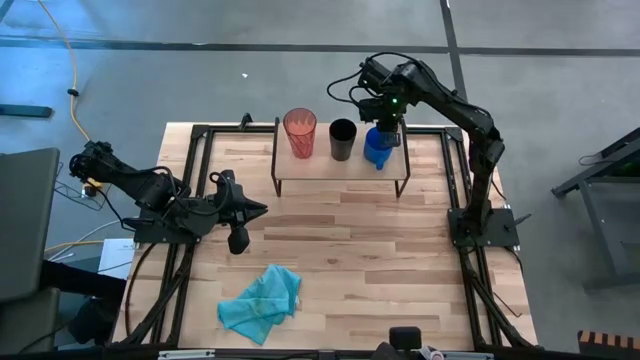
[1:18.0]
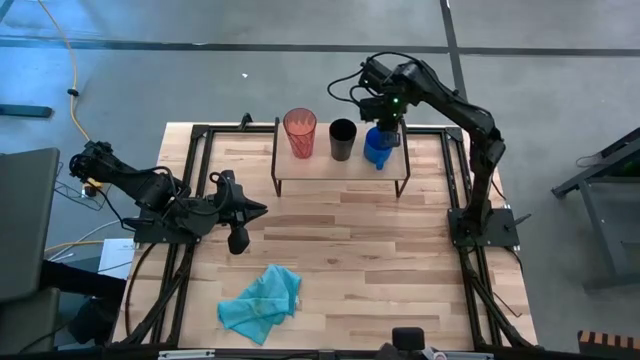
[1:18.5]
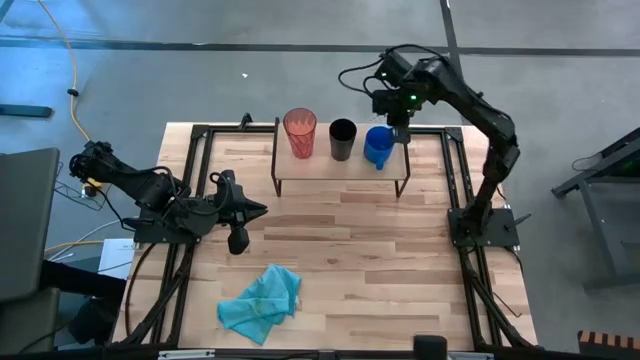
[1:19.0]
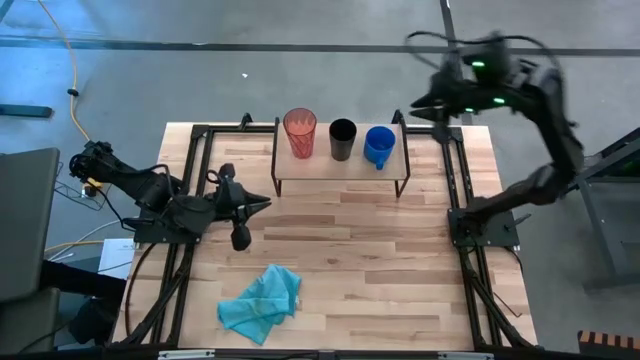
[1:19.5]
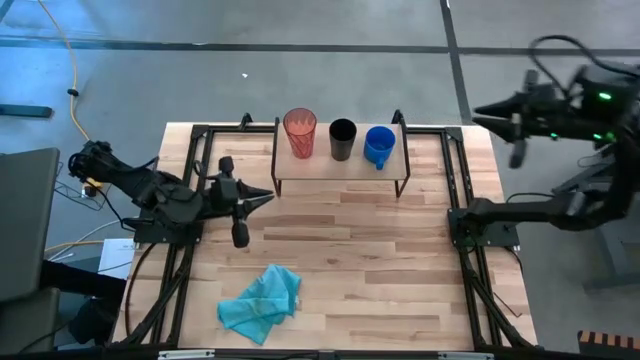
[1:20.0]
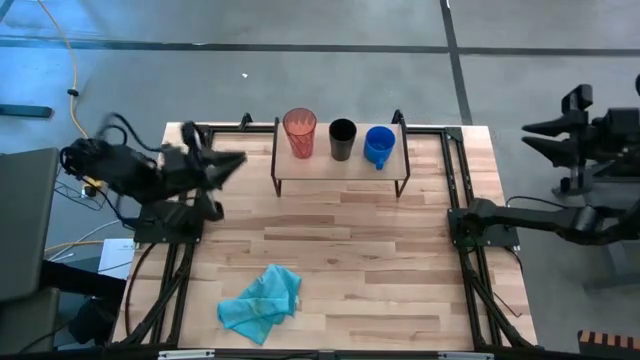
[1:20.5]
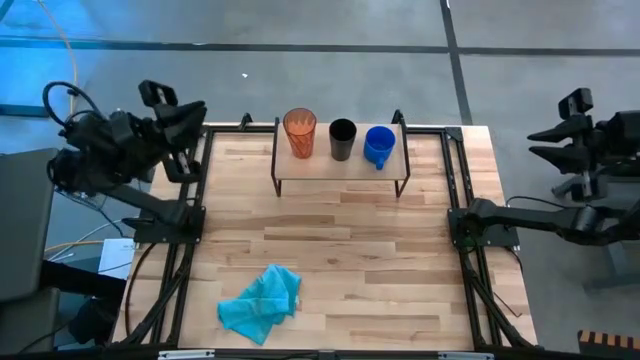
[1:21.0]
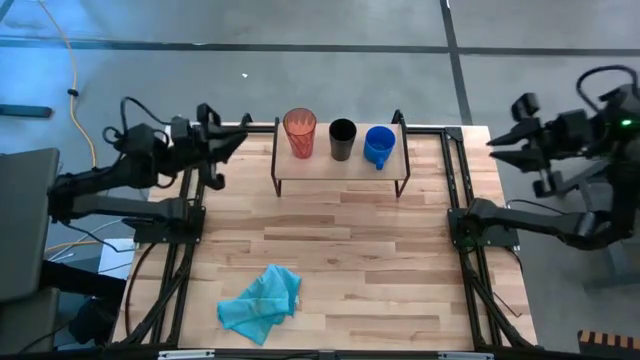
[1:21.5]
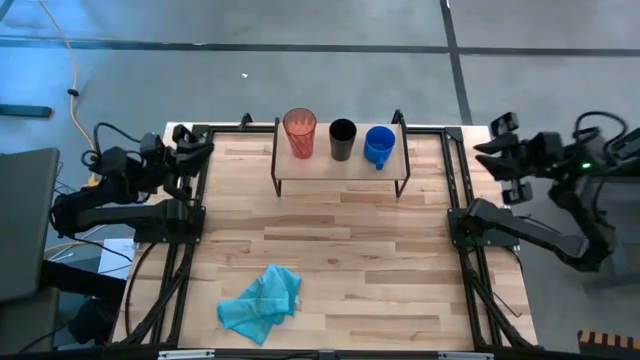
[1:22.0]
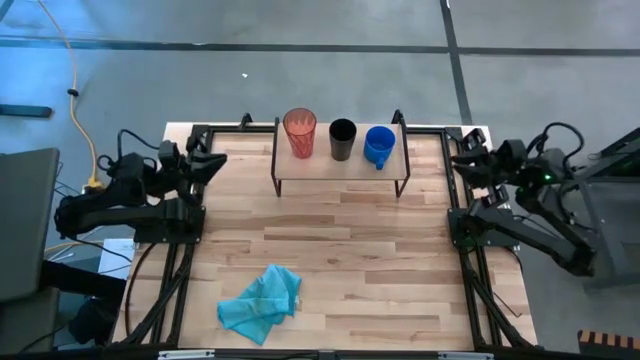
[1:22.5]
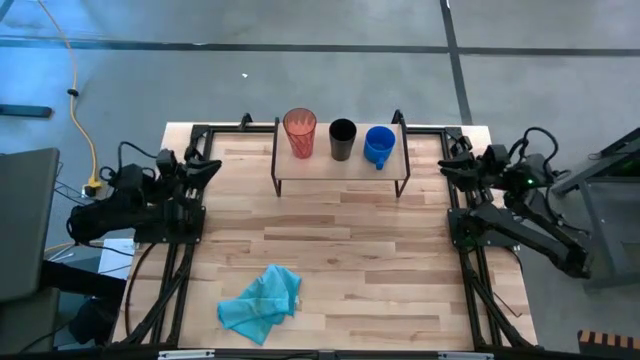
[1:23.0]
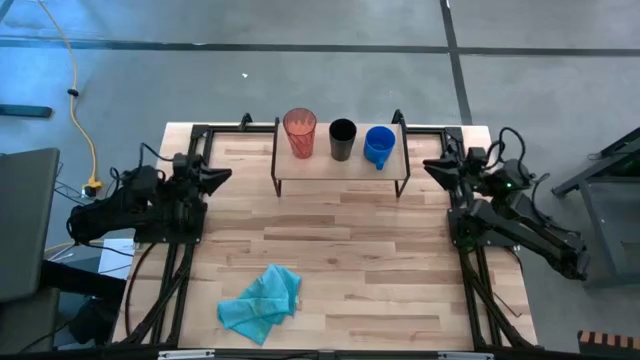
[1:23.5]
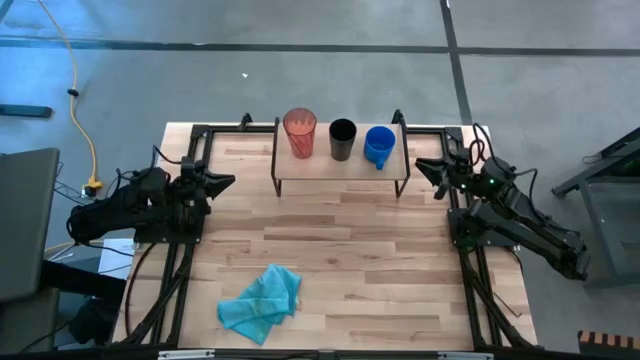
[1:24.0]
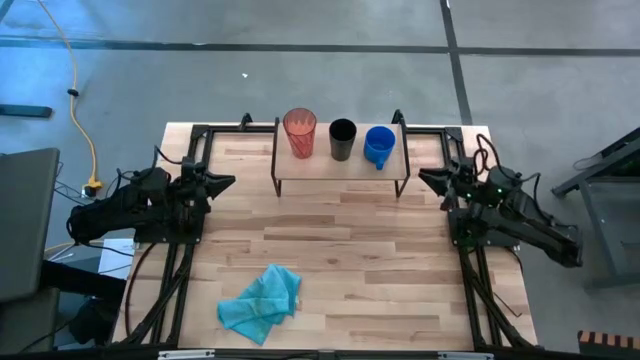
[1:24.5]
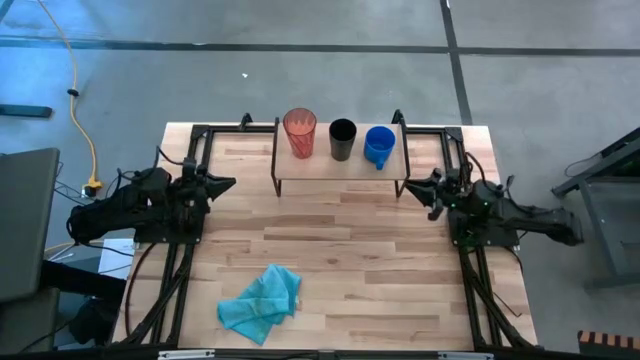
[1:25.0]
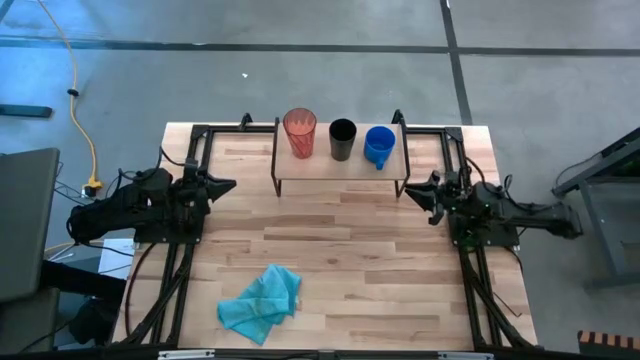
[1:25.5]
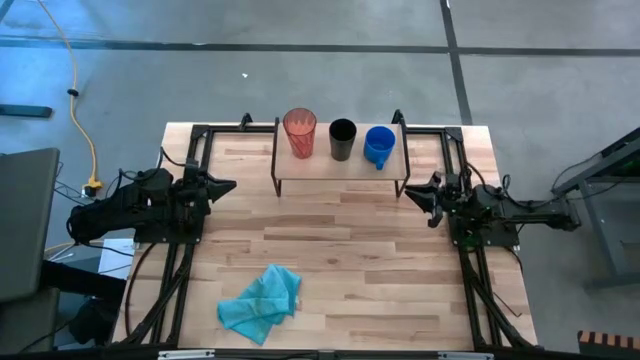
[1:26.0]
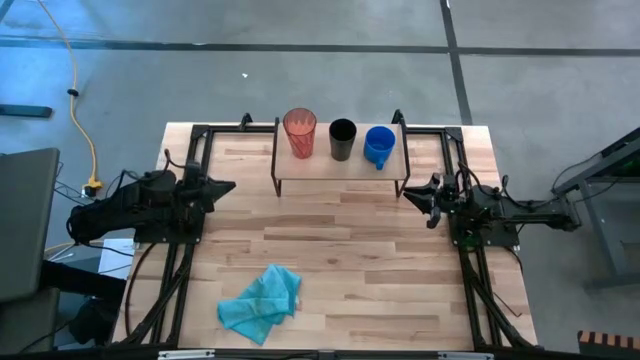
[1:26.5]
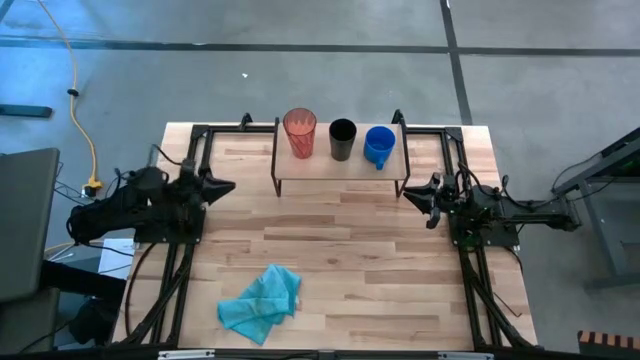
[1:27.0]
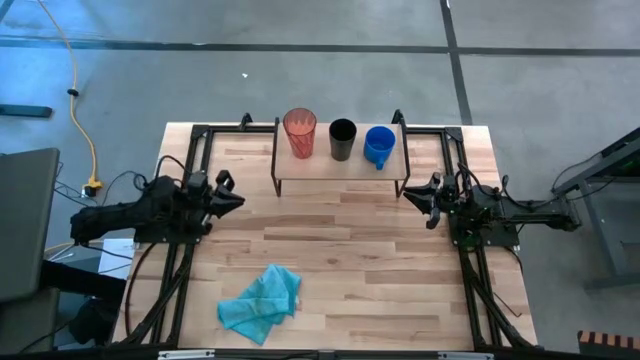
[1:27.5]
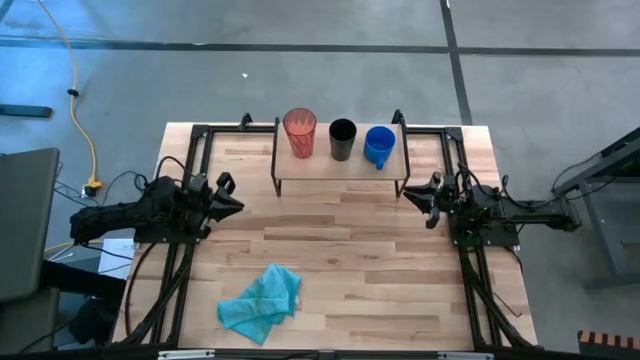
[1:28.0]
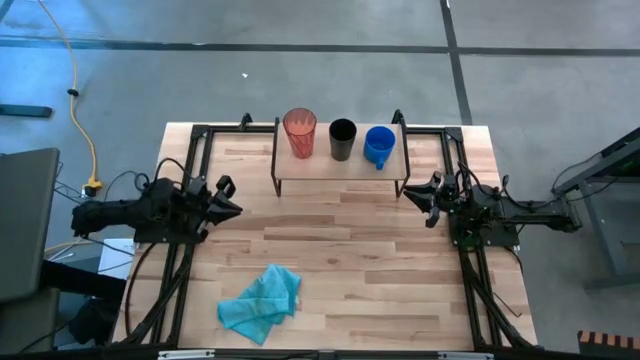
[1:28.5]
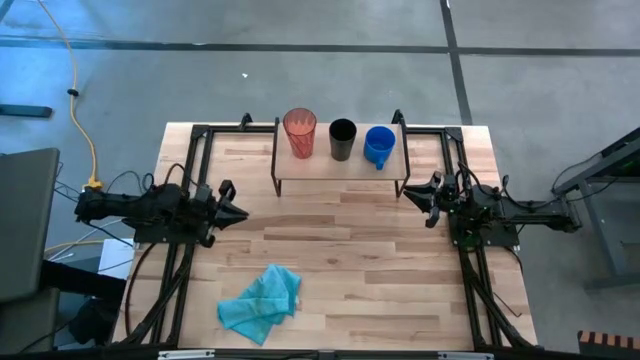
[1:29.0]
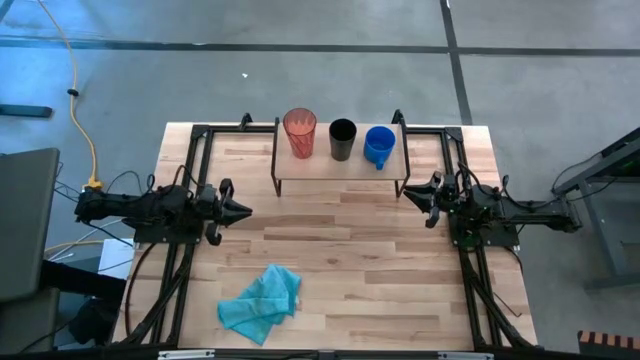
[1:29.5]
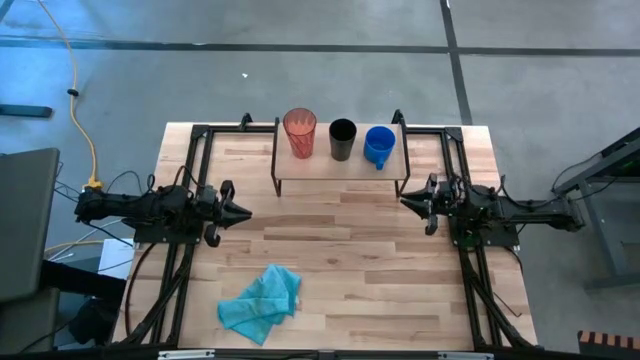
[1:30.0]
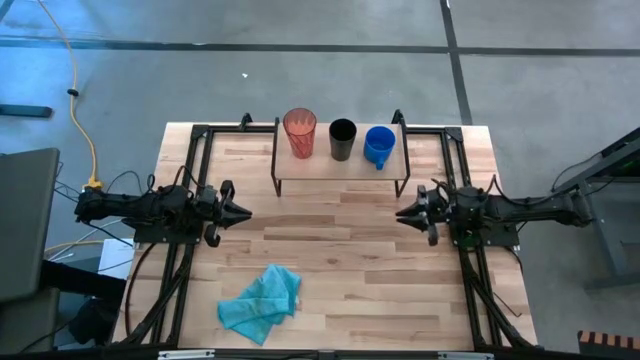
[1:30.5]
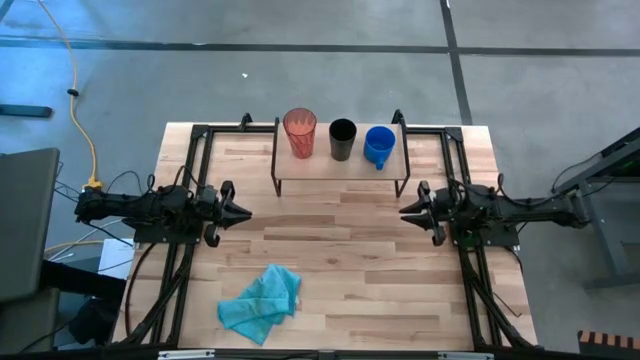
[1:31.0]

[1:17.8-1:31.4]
Task: Stack small to large cups/mugs on shelf
Return to Home Position

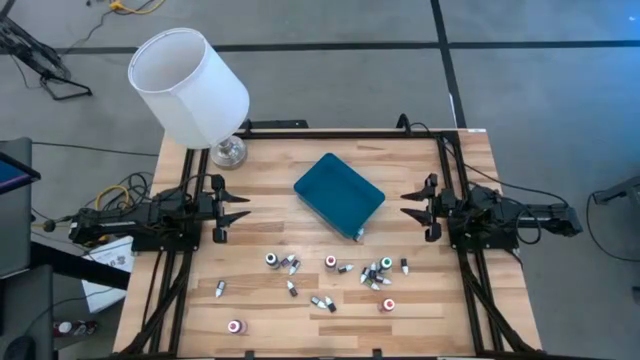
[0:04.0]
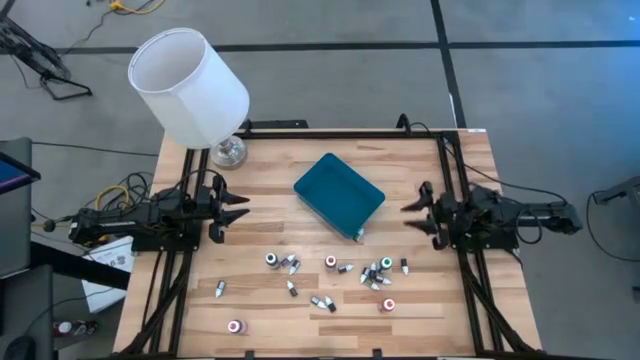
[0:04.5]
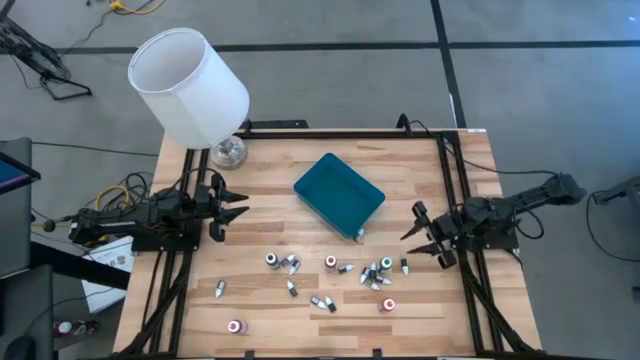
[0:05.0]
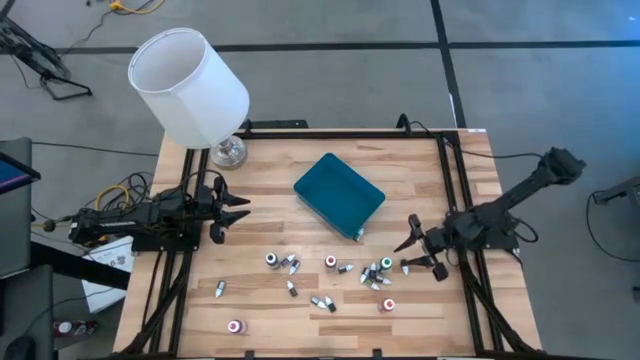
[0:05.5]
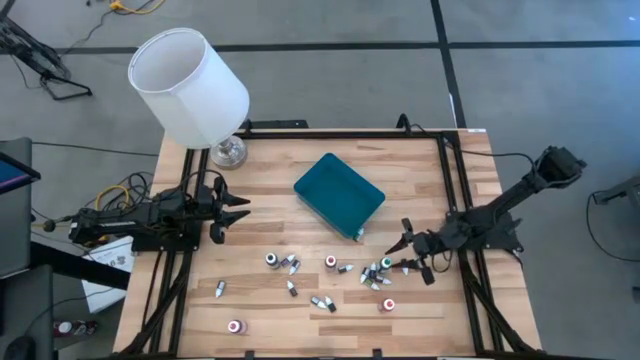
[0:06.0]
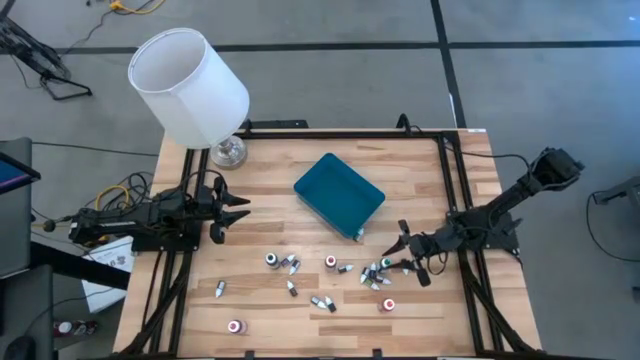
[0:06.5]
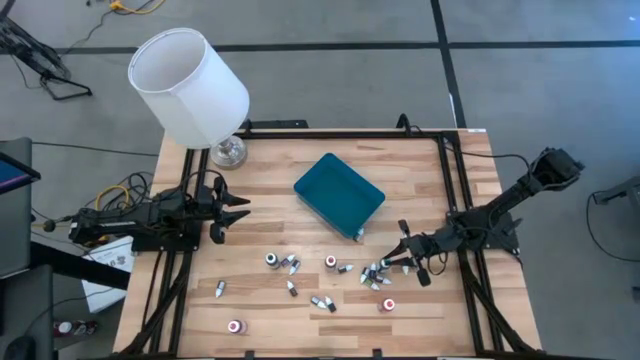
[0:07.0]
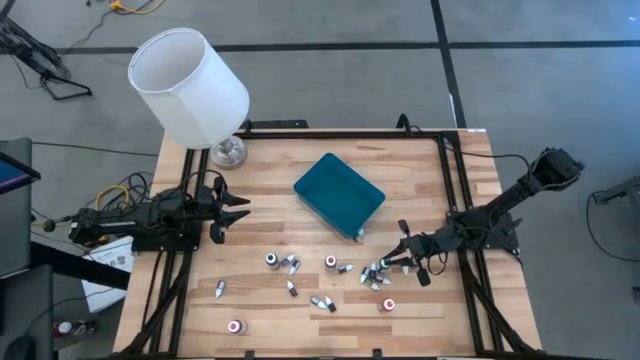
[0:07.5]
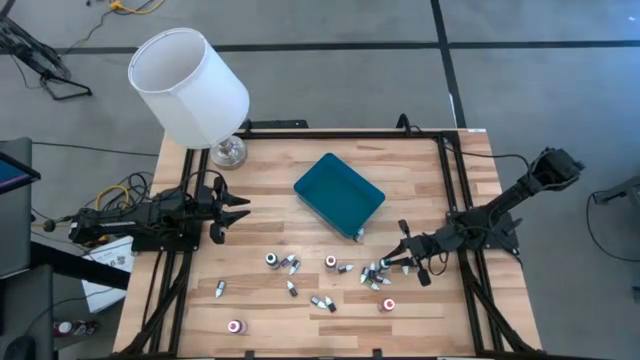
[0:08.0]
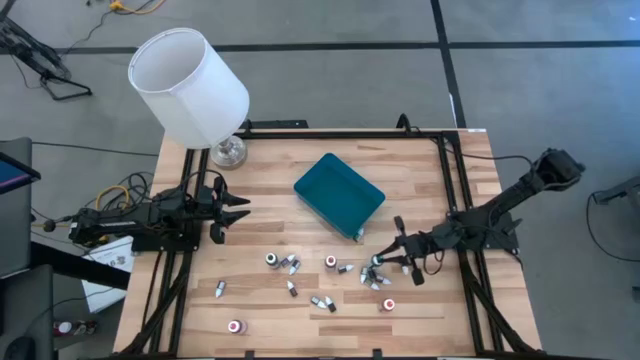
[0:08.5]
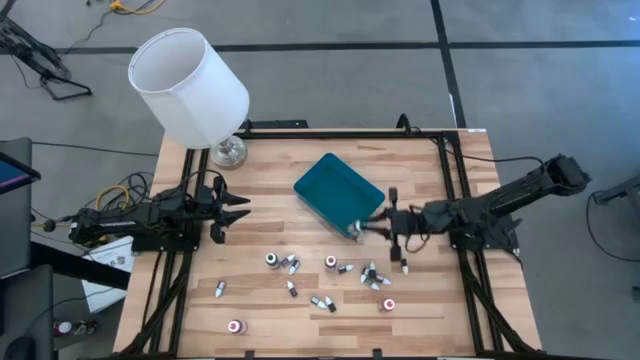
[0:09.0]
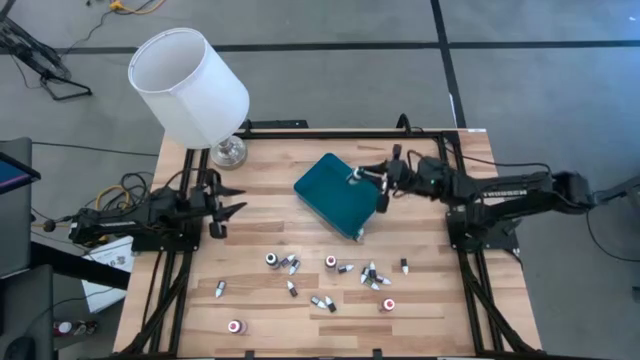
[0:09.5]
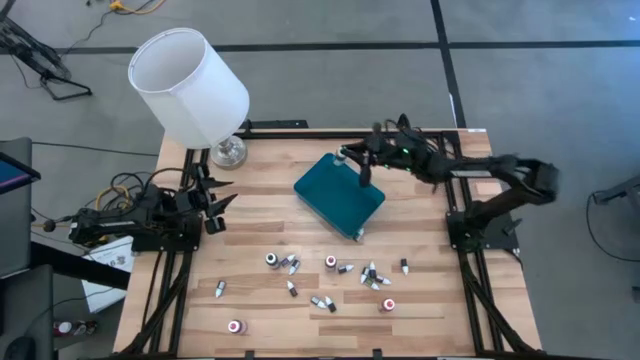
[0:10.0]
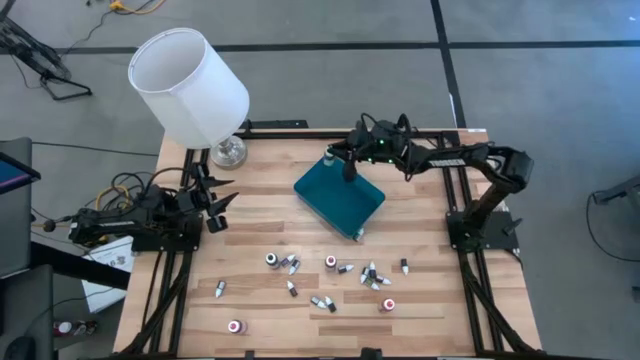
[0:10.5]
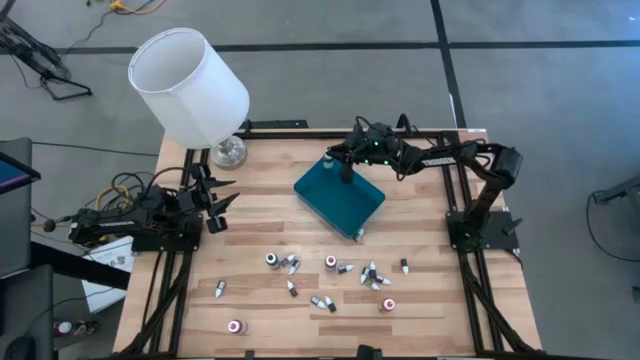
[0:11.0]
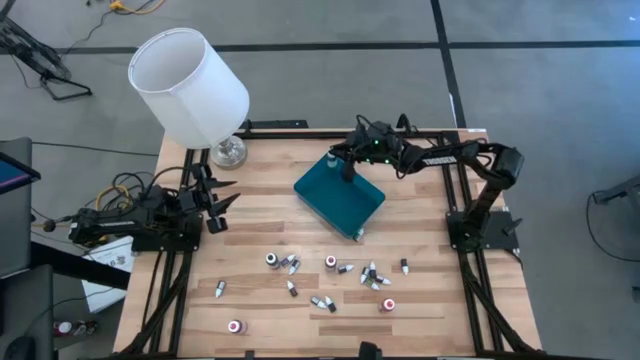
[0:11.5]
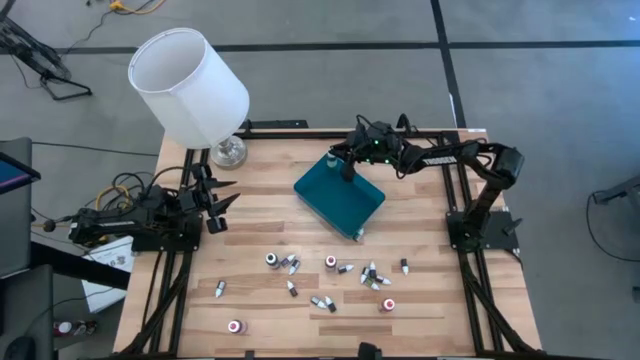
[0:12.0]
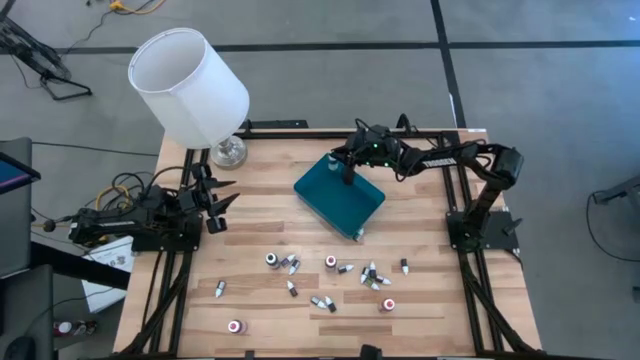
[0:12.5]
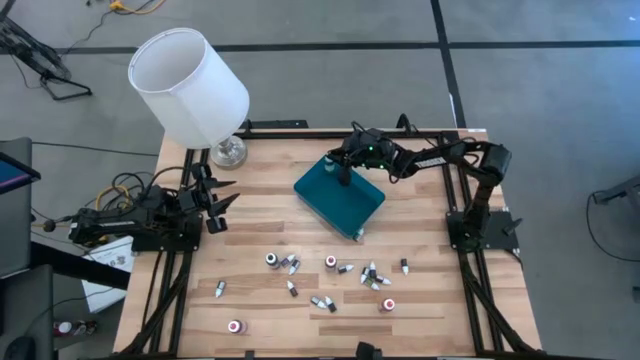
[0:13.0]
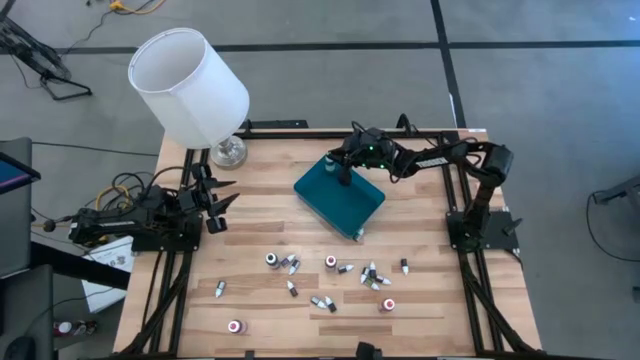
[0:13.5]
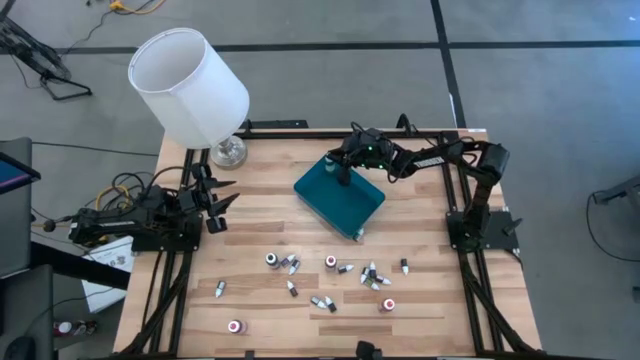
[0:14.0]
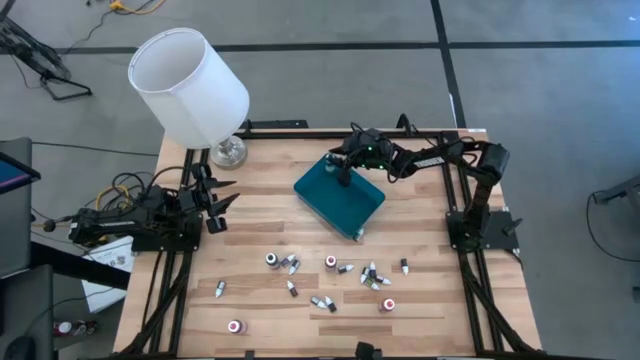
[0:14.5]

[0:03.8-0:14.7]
Task: Pick & Place food coloring
Put the large green food coloring bottle into the blue bin
